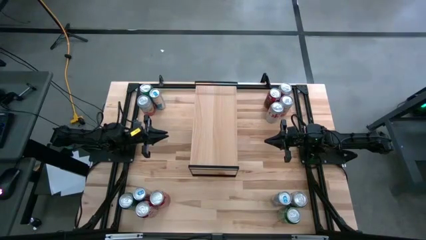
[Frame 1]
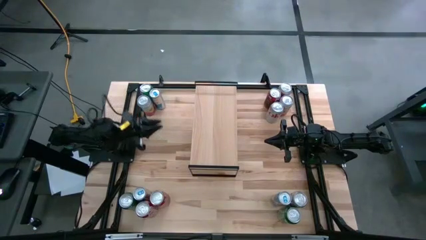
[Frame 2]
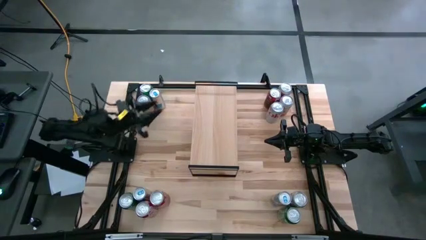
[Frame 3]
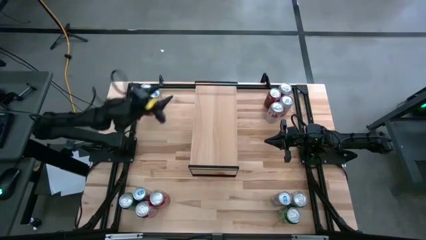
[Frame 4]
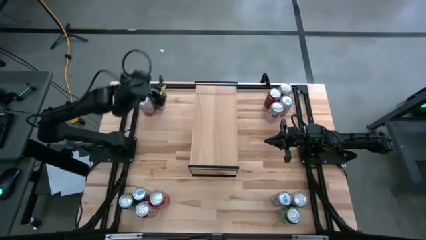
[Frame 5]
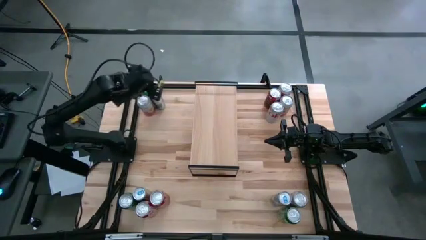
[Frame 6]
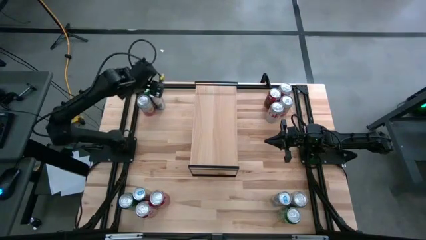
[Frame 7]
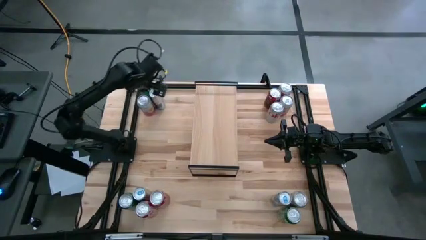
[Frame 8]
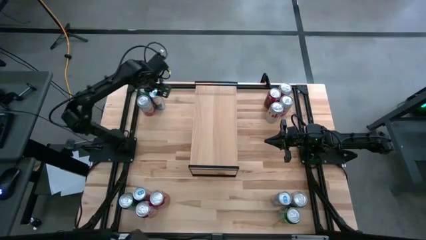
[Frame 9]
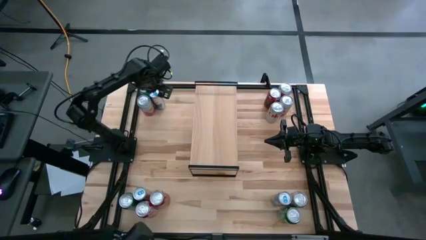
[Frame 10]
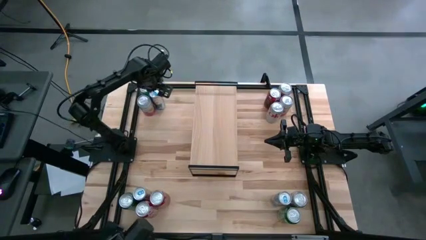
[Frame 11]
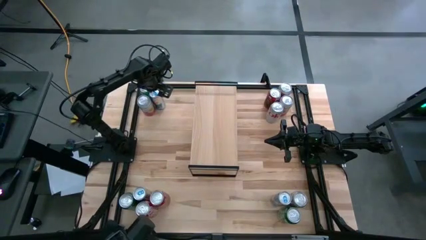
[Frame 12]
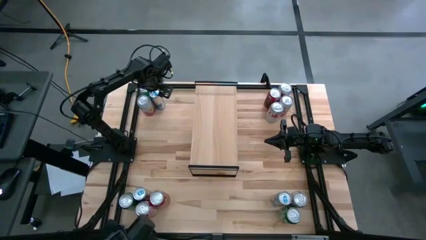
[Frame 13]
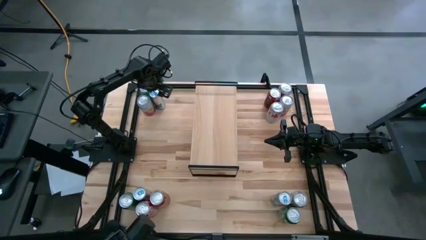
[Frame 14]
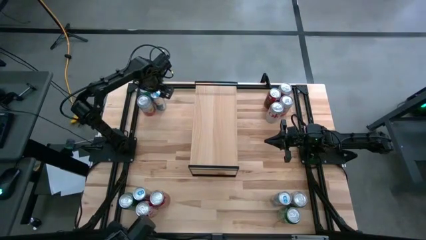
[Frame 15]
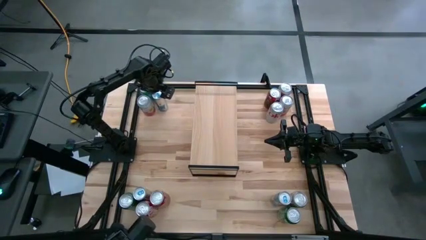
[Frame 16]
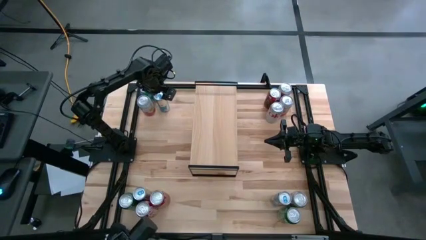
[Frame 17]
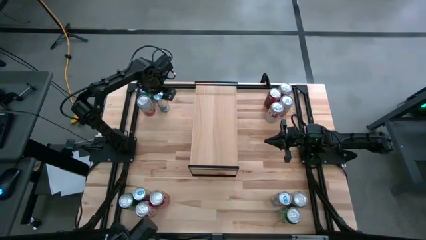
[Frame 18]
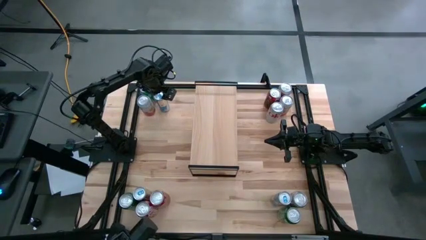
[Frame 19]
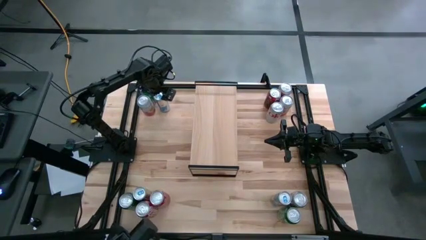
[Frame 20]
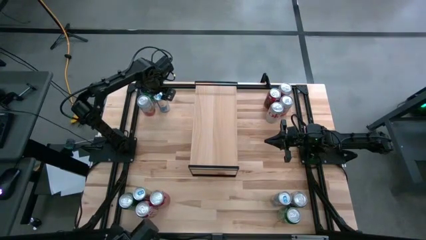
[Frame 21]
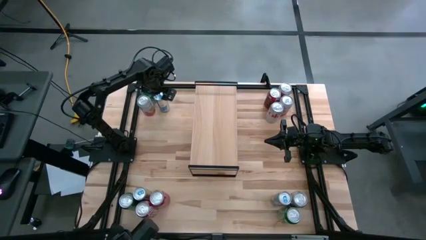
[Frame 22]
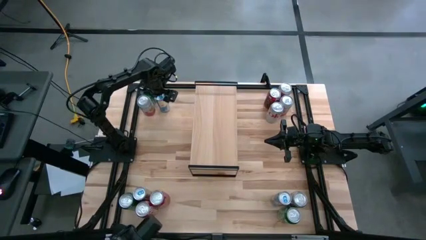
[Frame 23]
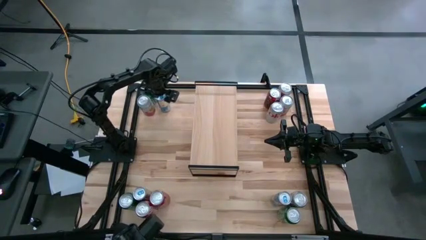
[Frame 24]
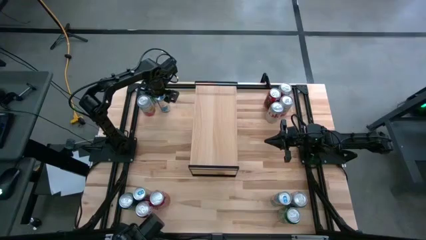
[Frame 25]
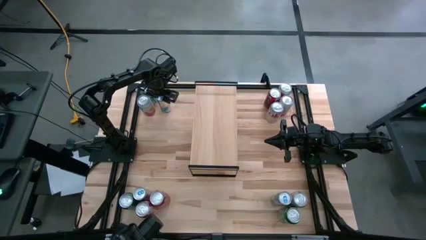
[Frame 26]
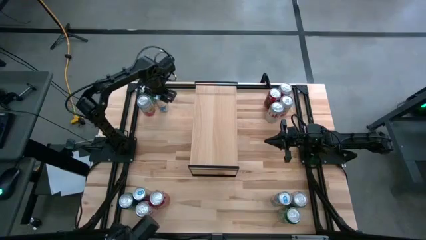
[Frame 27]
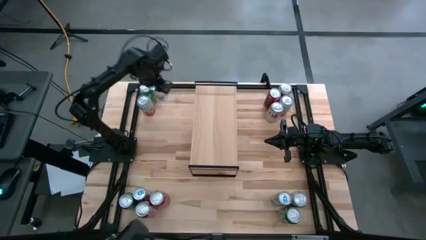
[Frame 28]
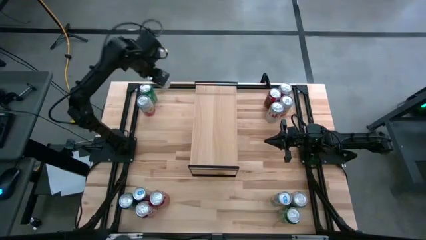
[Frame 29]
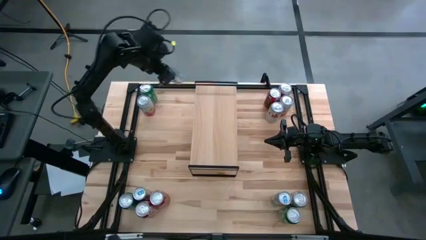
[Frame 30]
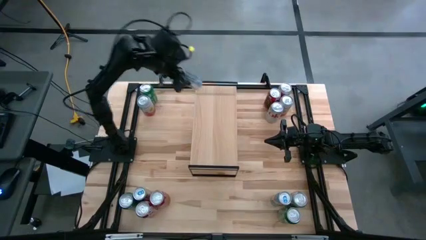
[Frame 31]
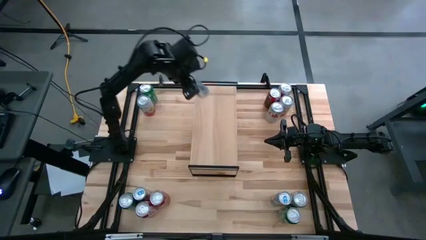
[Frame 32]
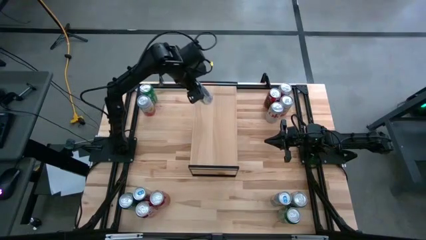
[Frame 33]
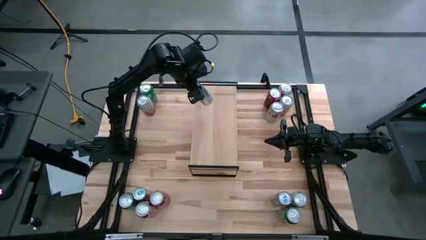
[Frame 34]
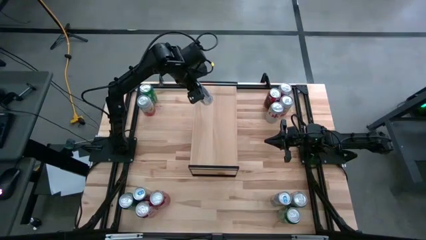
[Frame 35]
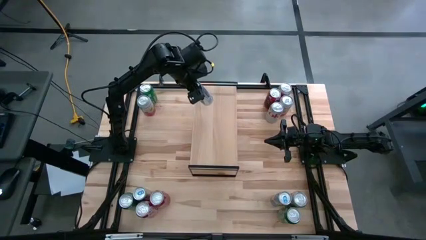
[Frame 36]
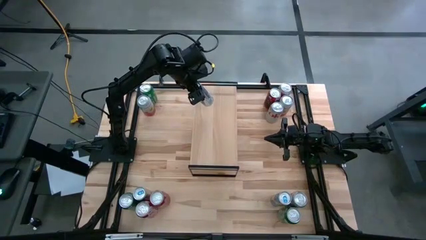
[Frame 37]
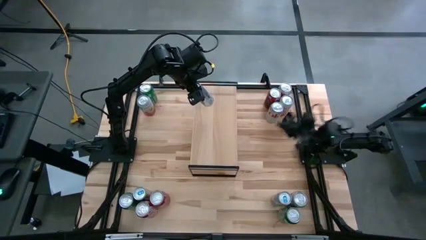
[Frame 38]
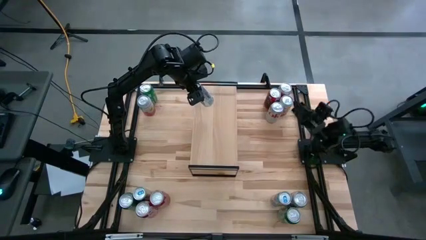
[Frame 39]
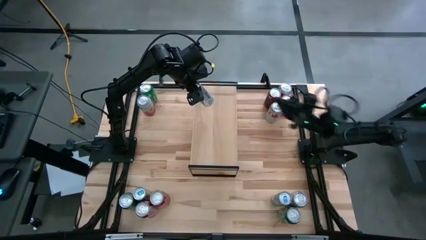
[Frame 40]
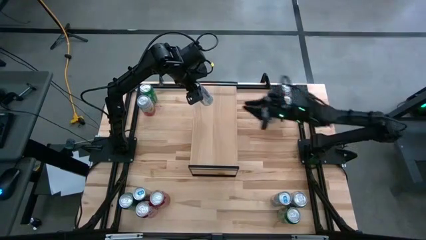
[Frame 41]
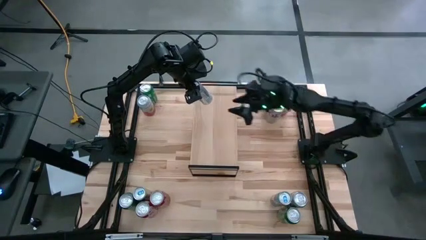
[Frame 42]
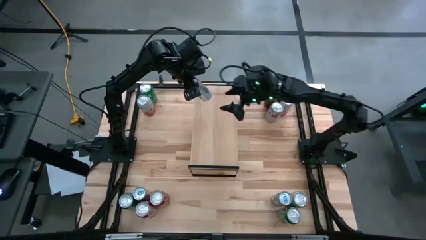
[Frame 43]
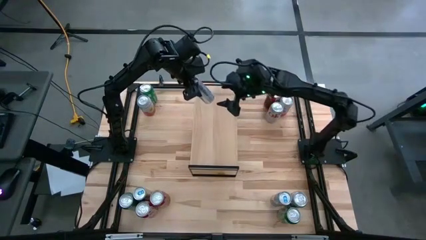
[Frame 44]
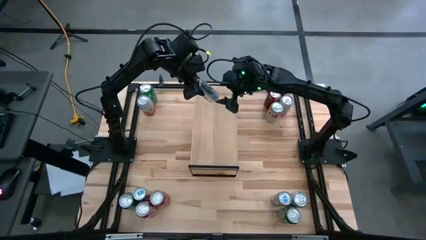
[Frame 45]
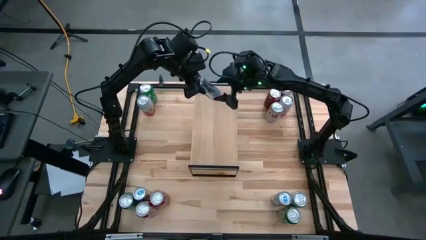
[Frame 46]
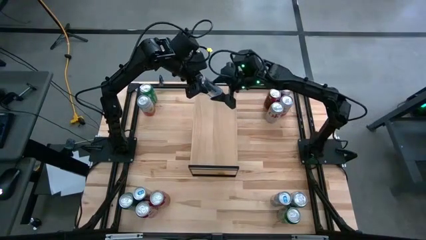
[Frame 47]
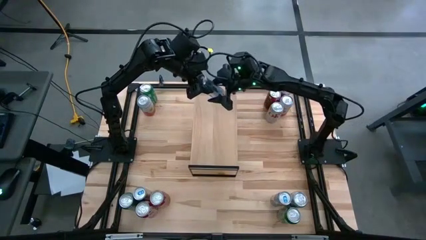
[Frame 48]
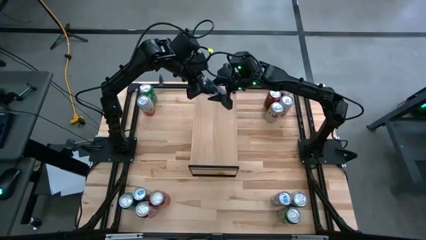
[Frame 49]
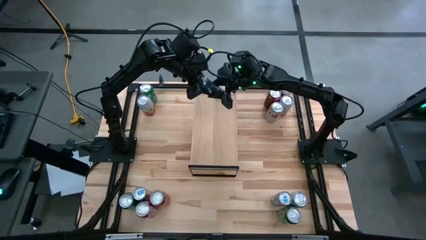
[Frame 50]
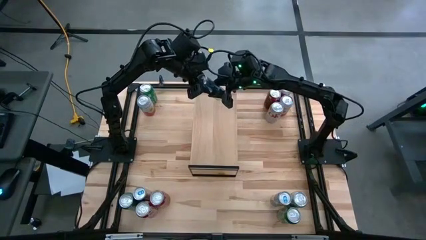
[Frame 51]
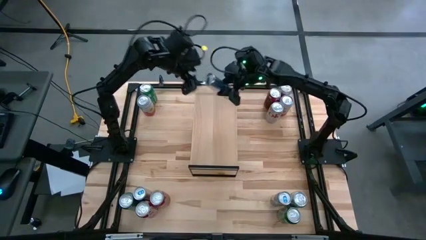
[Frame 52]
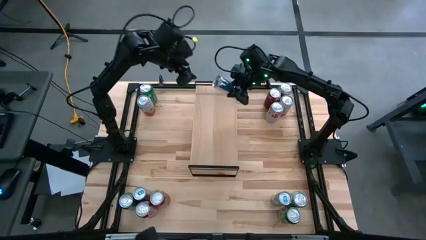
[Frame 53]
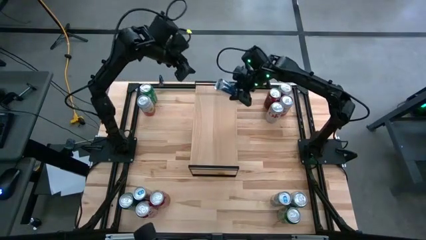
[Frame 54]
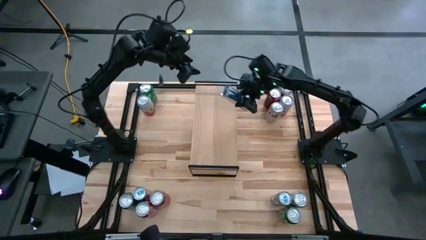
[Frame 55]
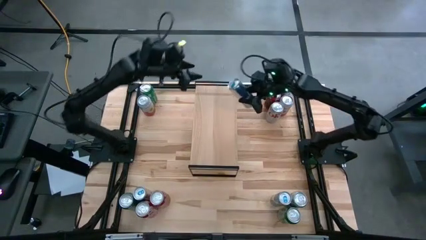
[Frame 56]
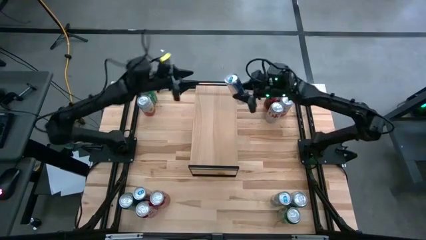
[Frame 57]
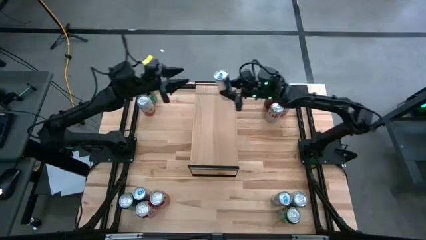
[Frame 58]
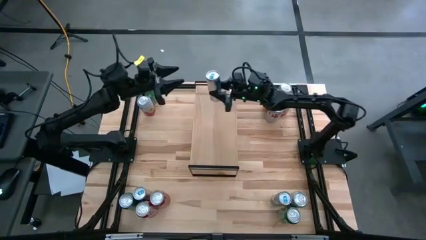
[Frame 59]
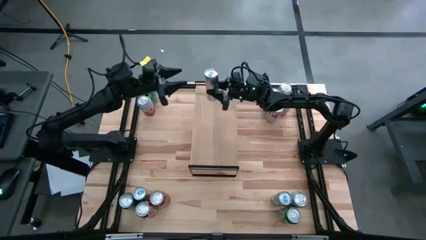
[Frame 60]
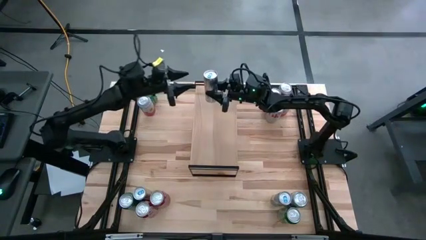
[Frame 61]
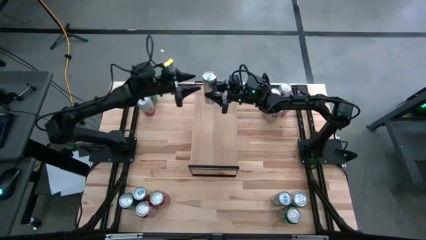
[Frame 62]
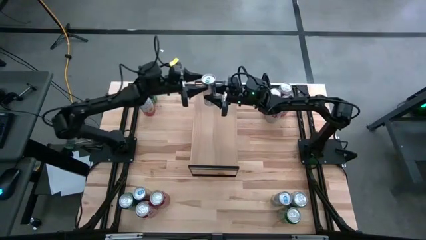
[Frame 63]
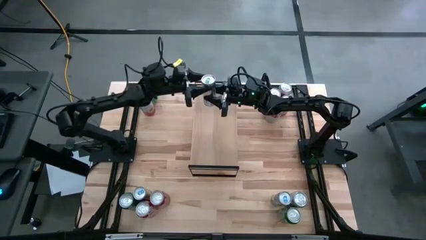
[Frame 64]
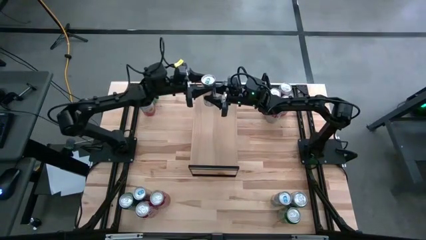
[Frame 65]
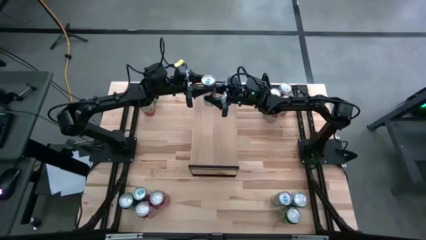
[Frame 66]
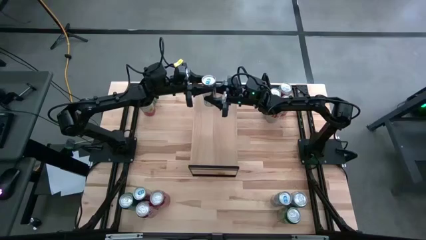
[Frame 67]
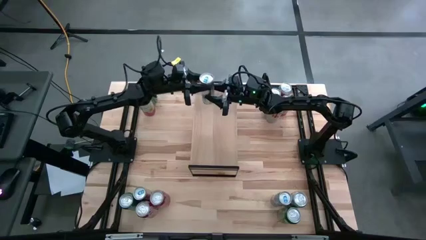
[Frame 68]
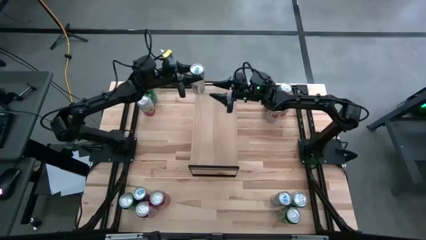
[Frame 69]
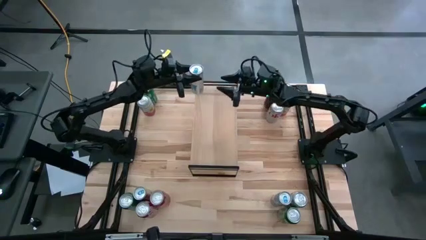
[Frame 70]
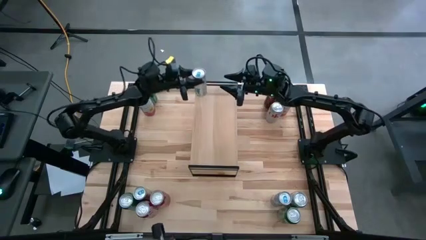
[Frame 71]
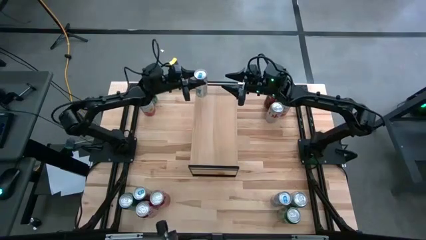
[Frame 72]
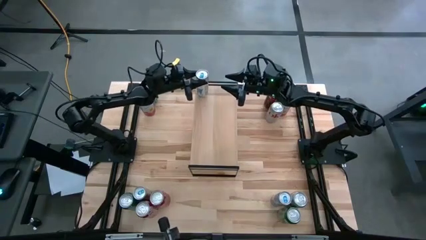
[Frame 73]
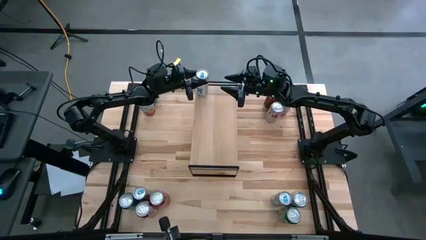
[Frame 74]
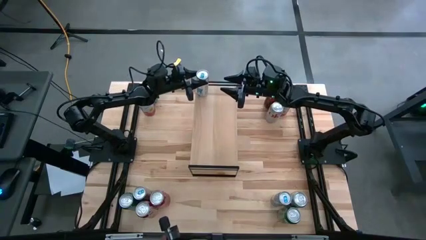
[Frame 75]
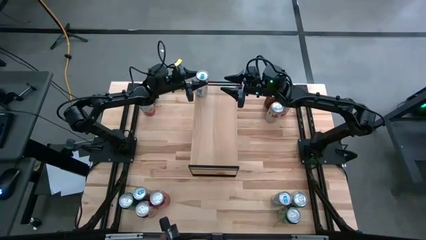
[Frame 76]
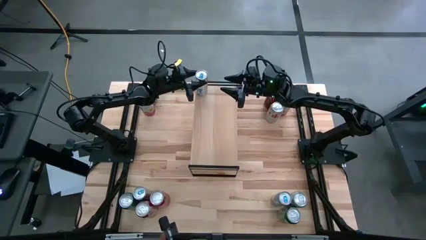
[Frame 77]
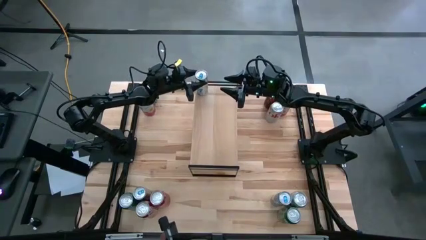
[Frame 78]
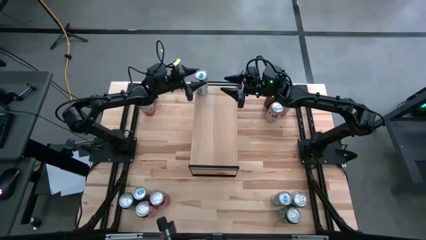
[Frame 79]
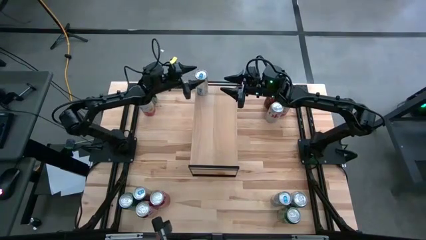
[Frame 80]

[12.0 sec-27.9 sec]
Task: Place canned beverage on shelf
Put the top blue soda can on the shelf
